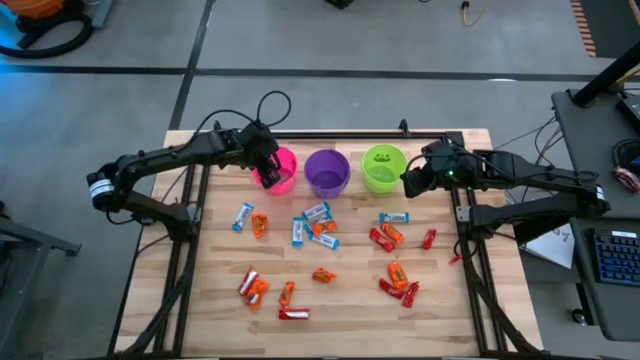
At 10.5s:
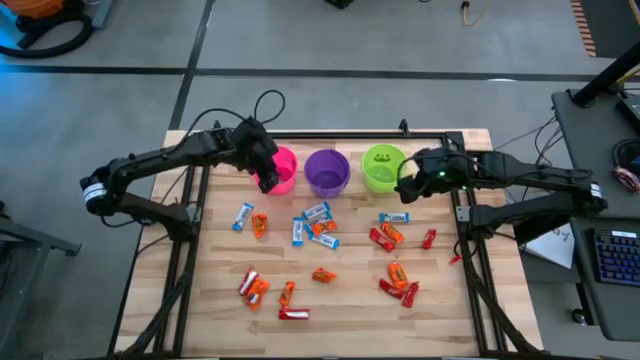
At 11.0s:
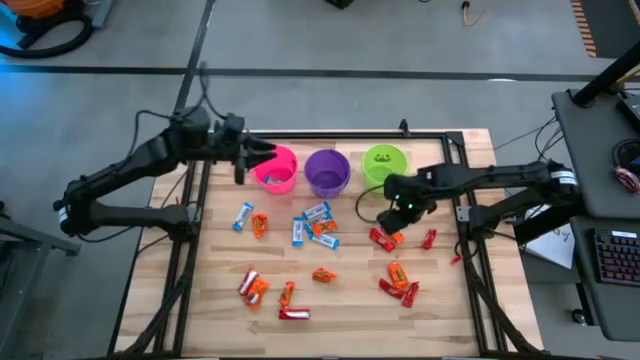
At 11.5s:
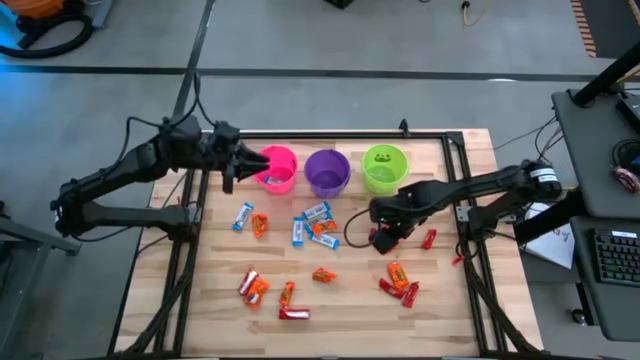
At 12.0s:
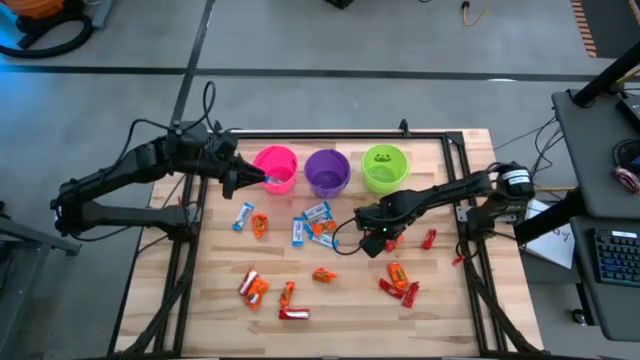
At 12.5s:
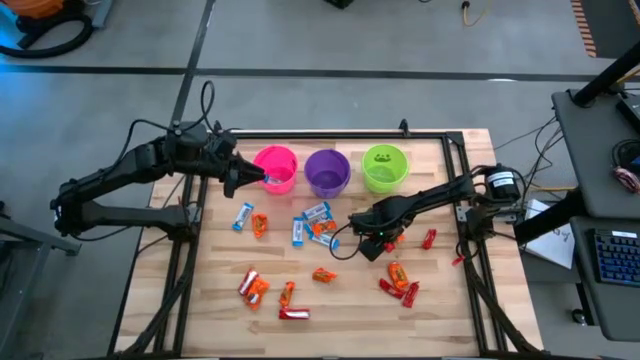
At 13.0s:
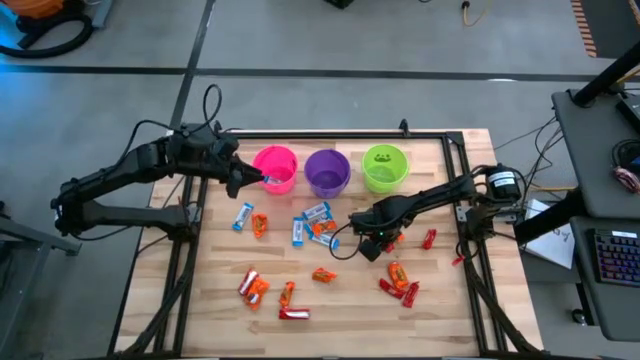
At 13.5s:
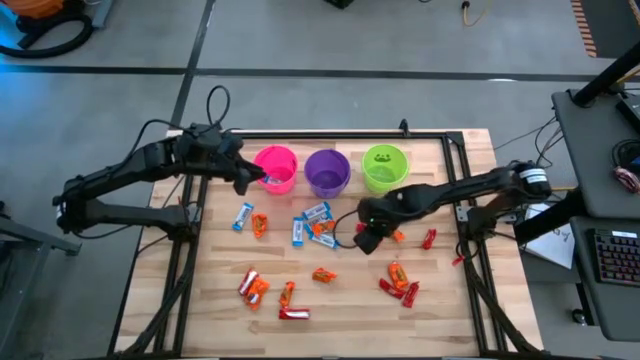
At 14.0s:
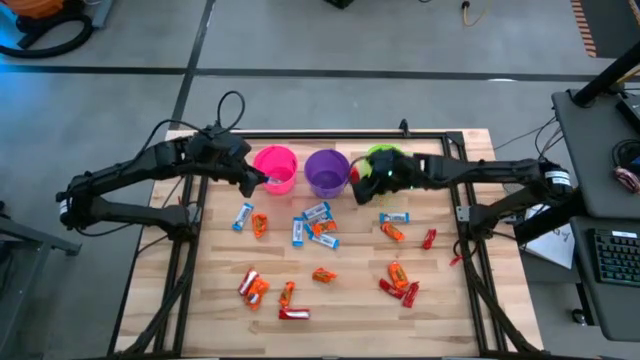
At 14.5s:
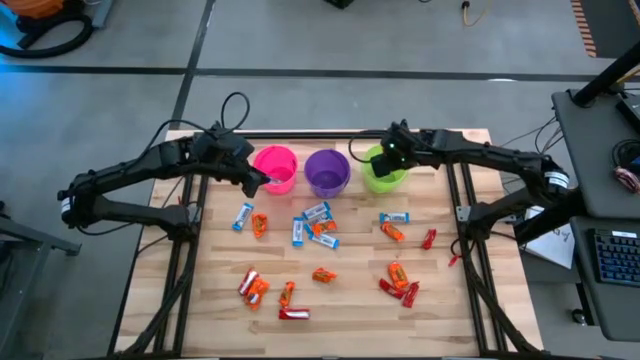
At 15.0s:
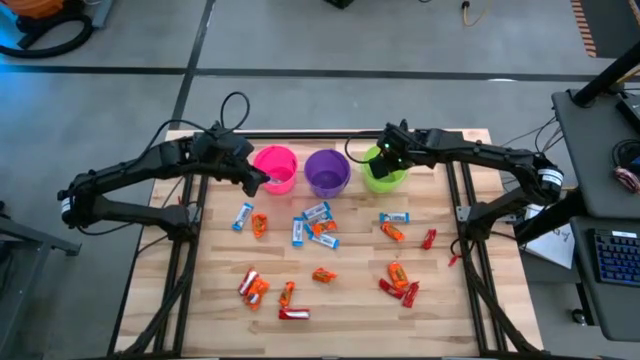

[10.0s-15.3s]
Task: Organize candy in baskets
Put the red chocolate into the green bucket

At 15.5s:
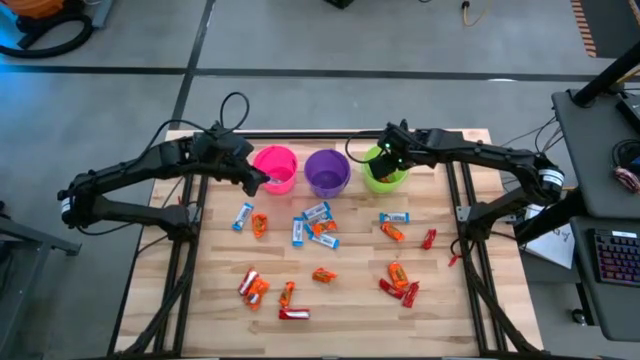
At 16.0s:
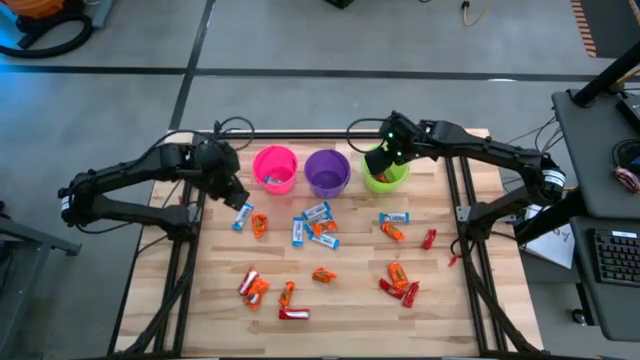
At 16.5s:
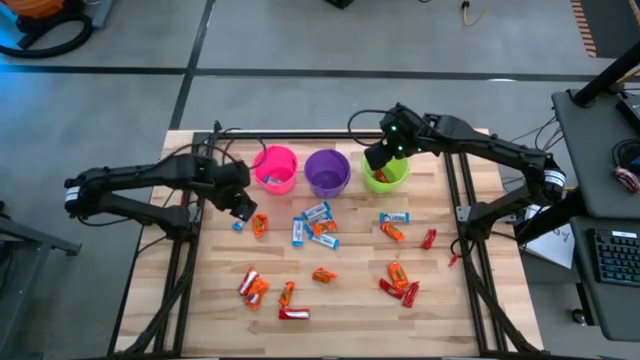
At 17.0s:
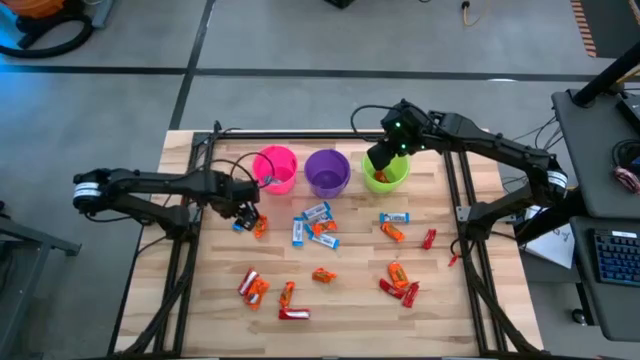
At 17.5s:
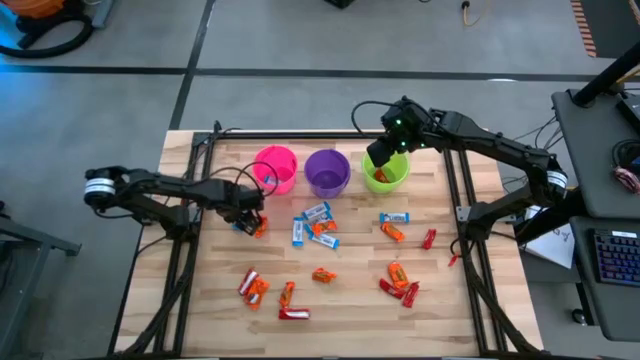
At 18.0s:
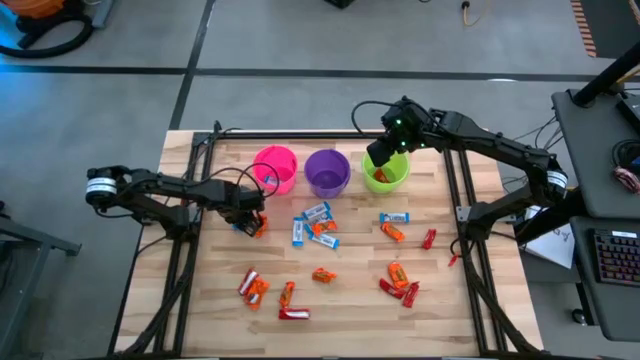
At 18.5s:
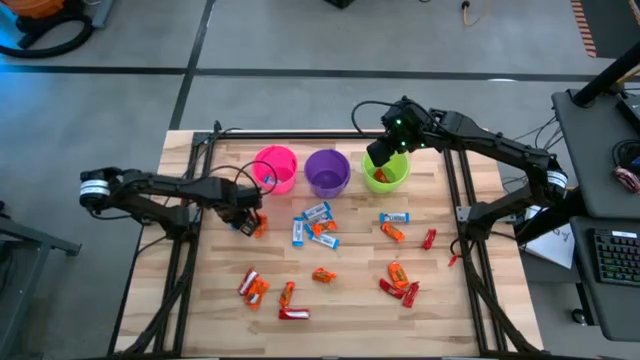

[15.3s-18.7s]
Put the white chocolate into the pink bucket

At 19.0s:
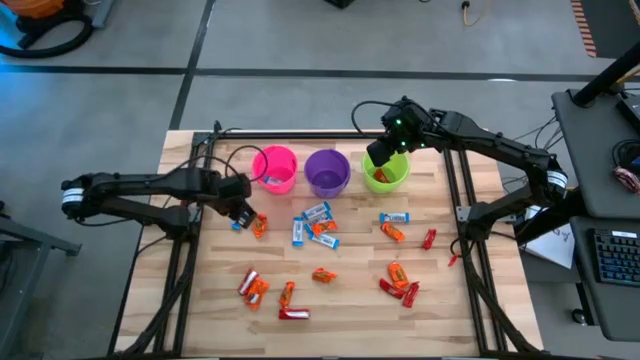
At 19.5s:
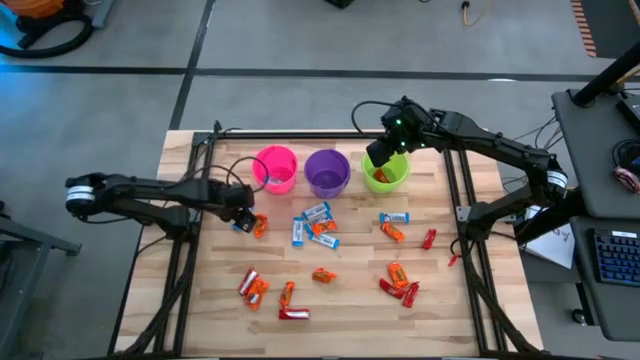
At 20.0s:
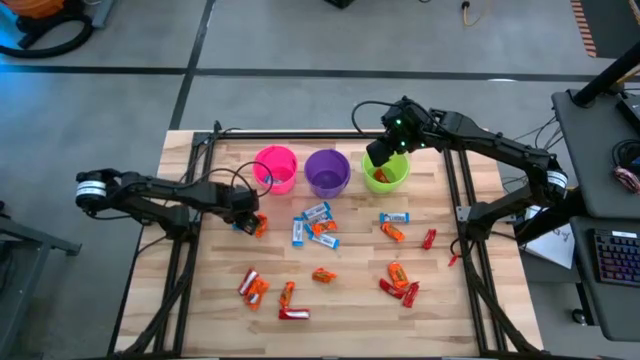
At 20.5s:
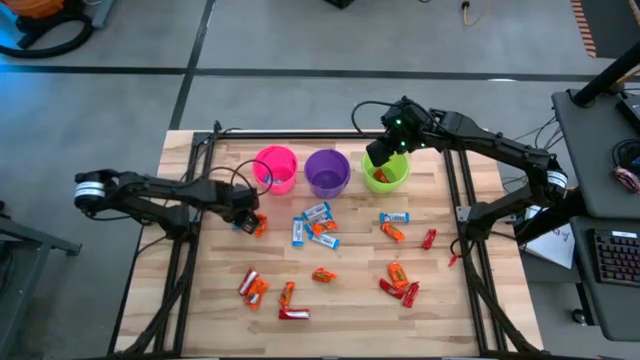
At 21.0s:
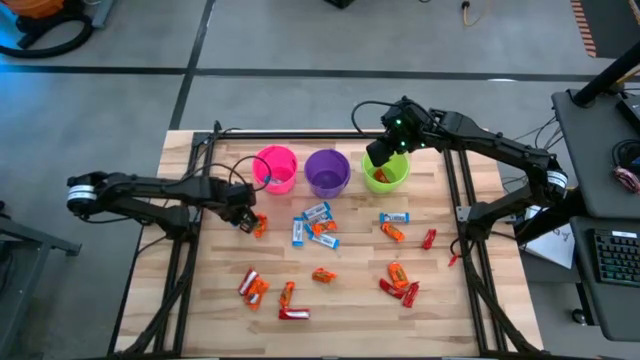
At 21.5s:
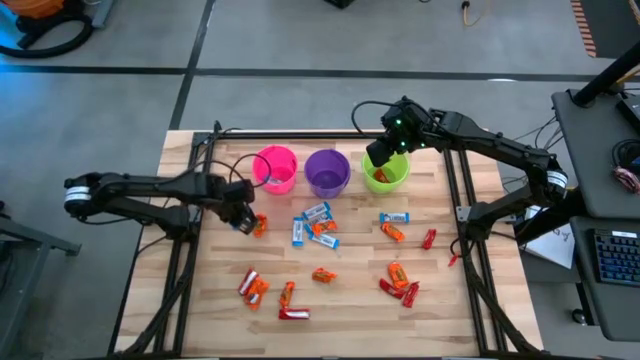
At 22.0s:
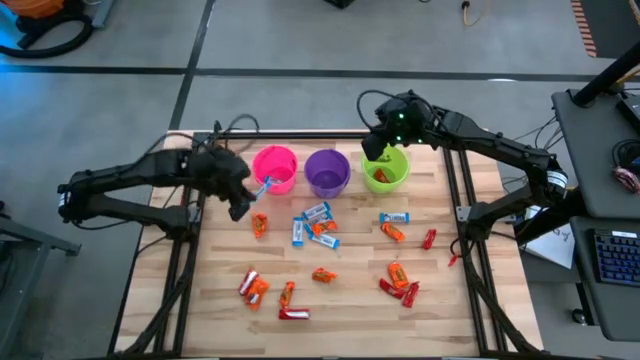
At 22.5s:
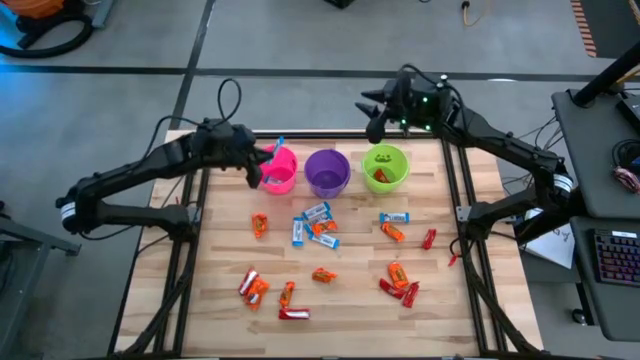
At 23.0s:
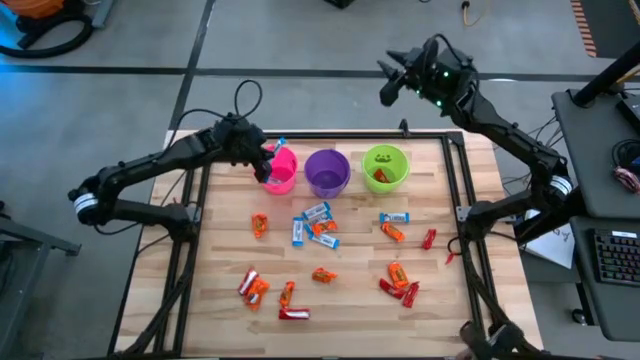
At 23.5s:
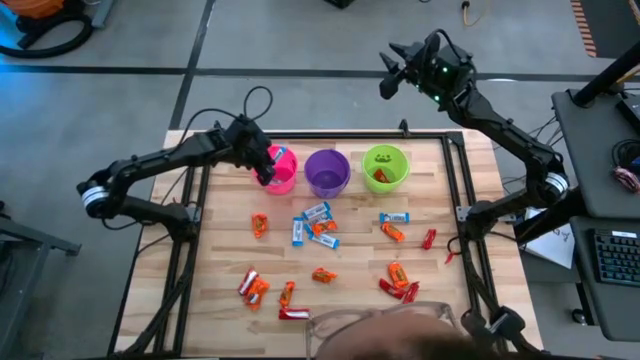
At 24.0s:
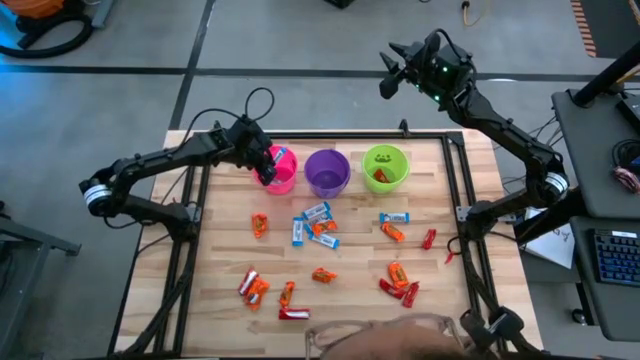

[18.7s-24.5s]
Put the white chocolate into the pink bucket

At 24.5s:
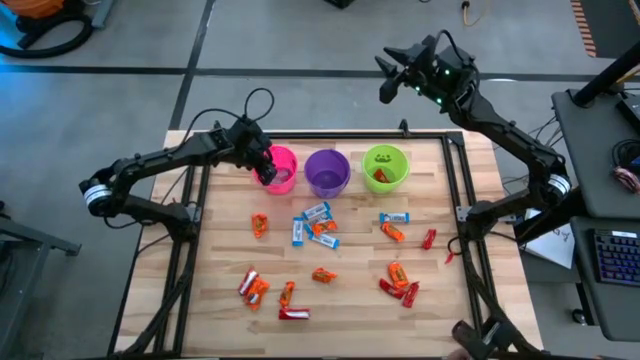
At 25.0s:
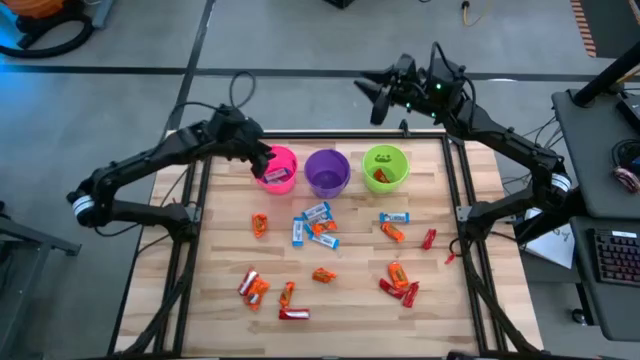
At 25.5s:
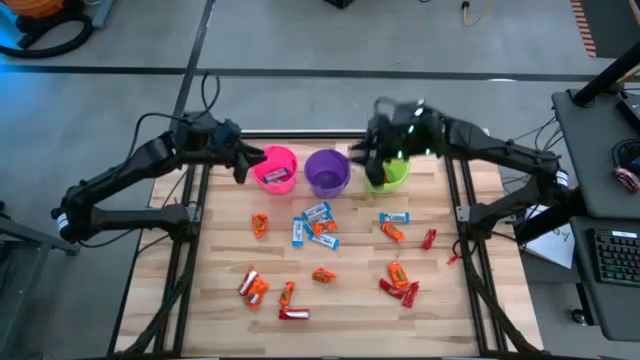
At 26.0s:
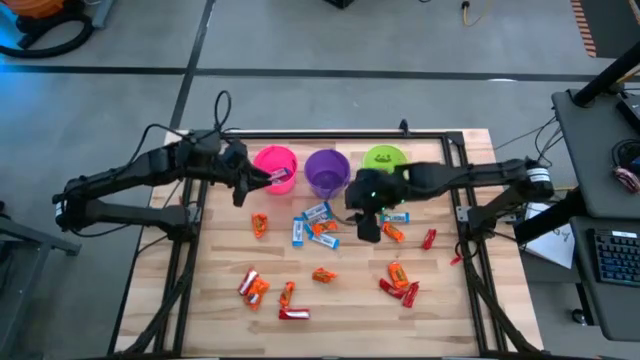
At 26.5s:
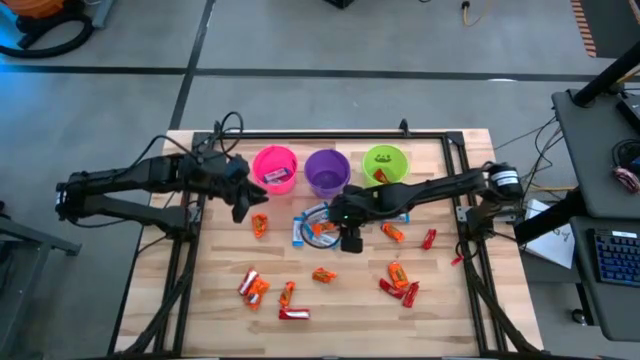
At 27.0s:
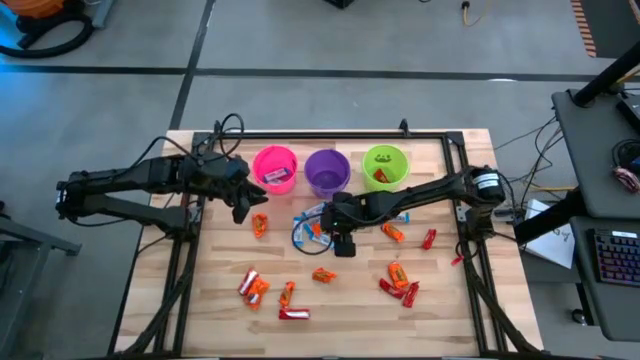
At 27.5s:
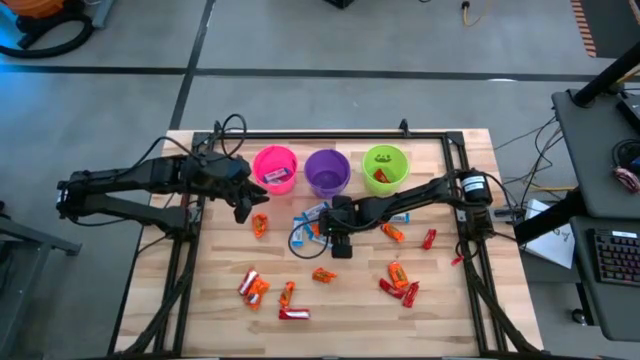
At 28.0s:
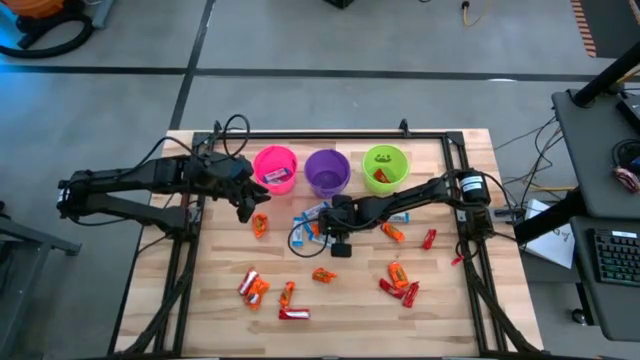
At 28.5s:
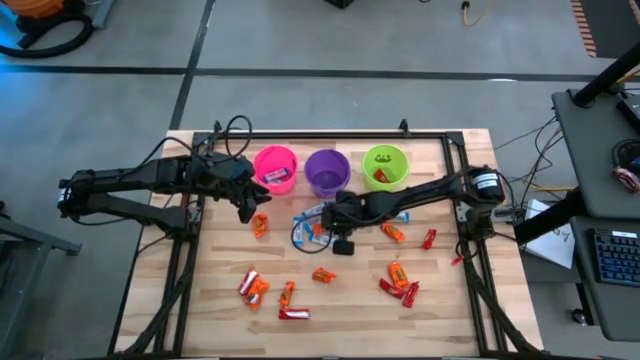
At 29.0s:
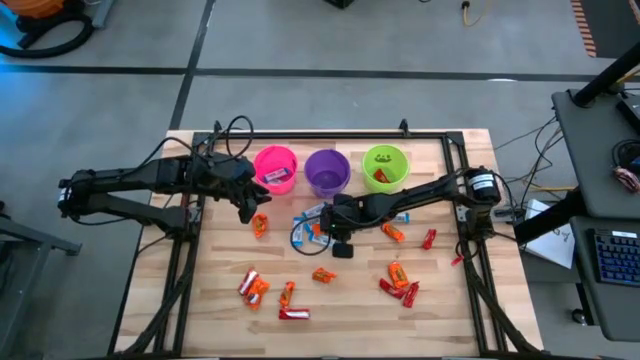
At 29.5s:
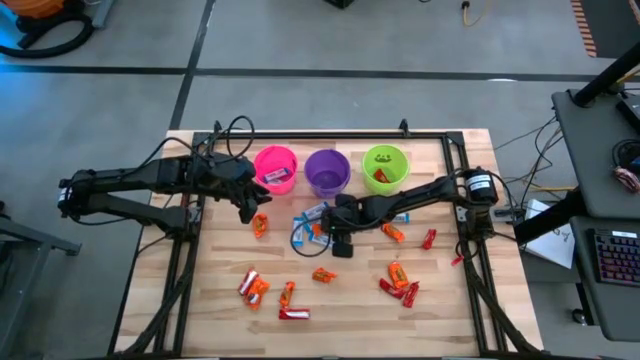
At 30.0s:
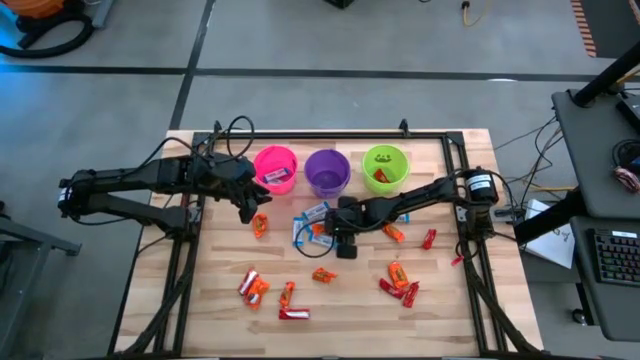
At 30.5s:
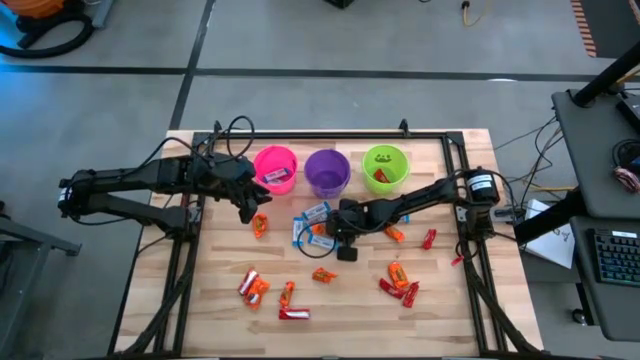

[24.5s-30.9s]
Put the orange chocolate into the violet bucket

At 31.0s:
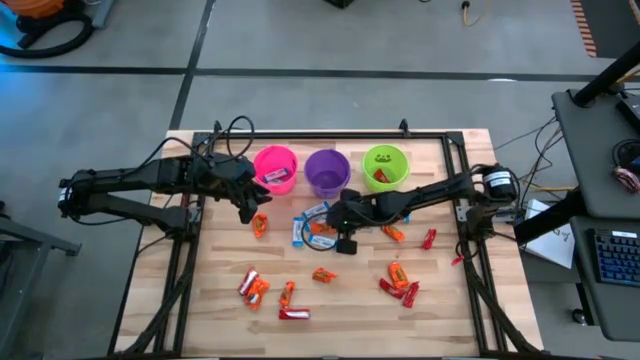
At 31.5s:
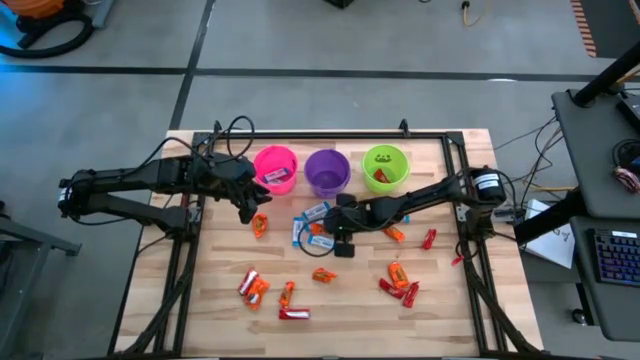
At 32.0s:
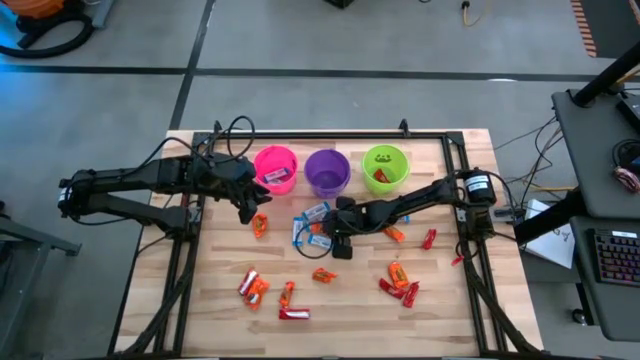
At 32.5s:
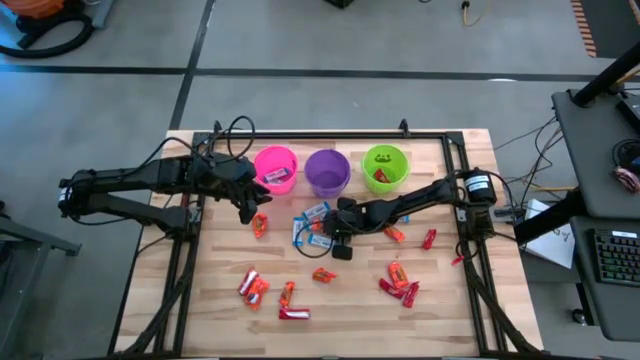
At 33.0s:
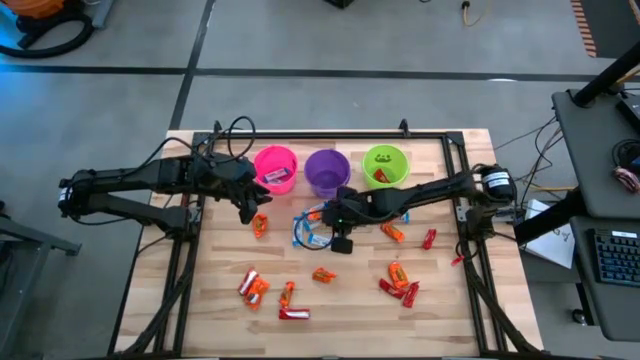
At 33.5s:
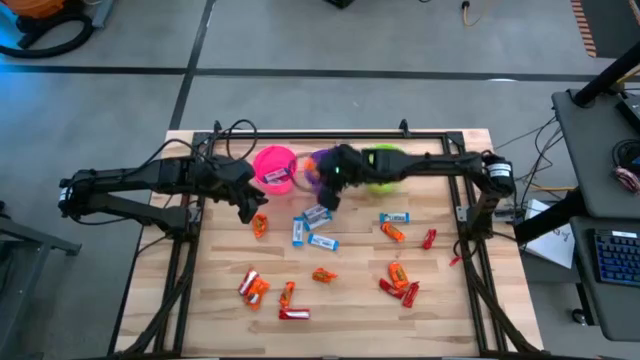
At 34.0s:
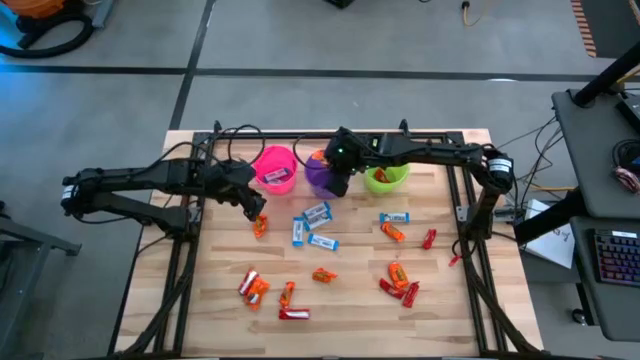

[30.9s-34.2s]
Put the orange chocolate into the violet bucket
